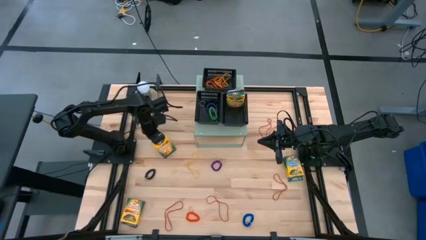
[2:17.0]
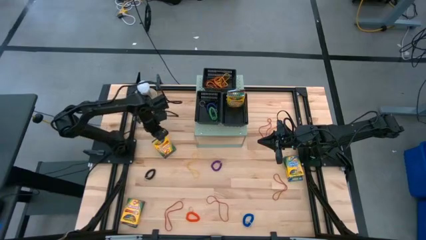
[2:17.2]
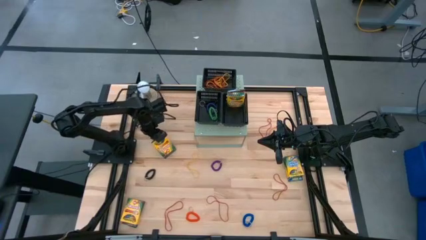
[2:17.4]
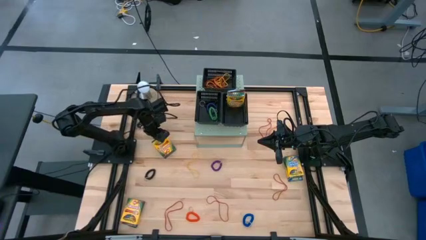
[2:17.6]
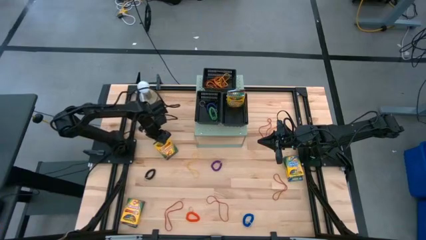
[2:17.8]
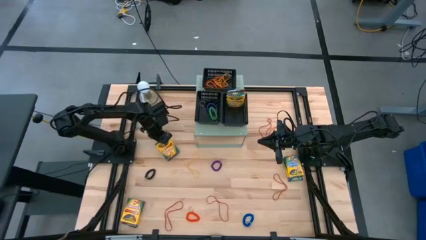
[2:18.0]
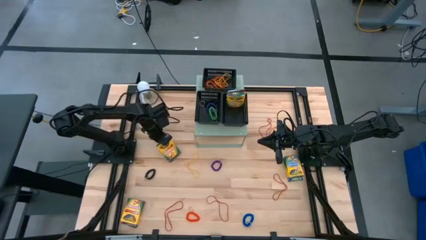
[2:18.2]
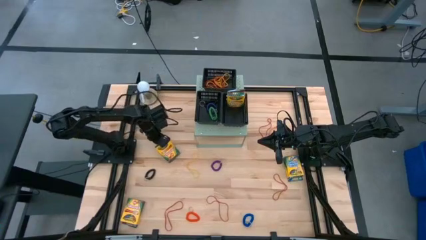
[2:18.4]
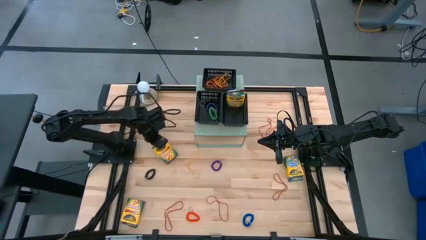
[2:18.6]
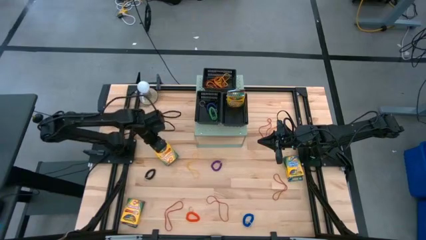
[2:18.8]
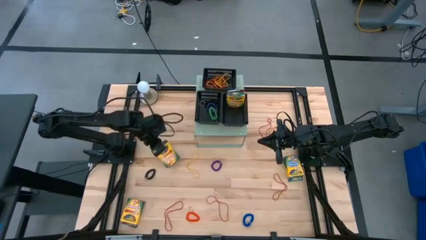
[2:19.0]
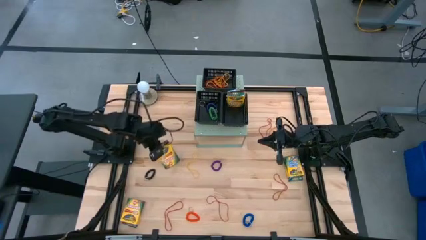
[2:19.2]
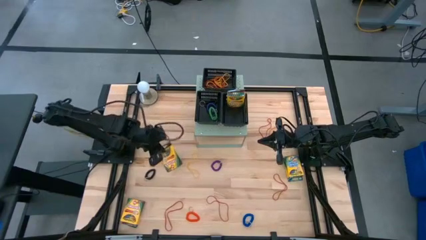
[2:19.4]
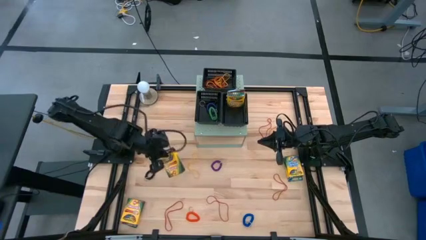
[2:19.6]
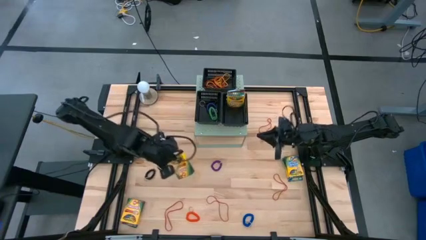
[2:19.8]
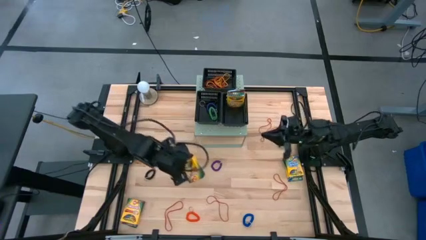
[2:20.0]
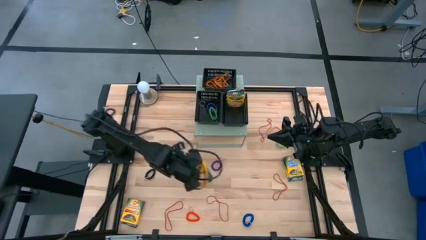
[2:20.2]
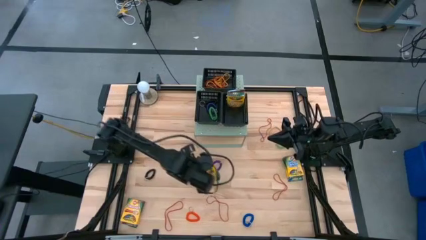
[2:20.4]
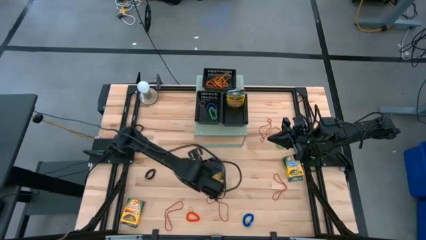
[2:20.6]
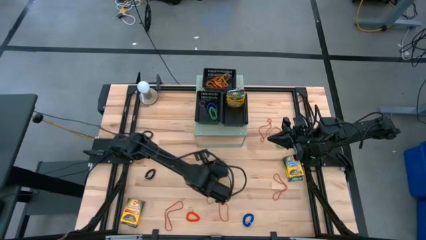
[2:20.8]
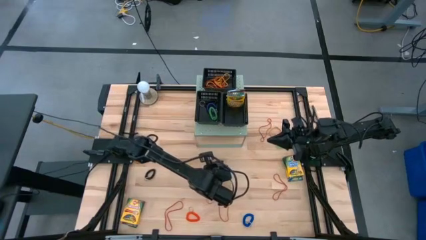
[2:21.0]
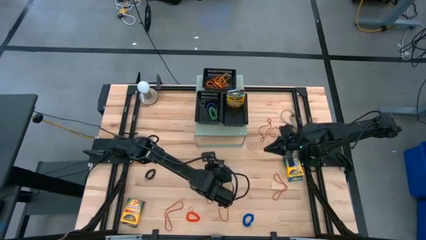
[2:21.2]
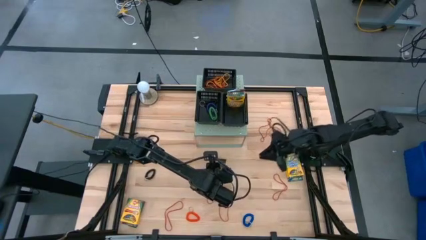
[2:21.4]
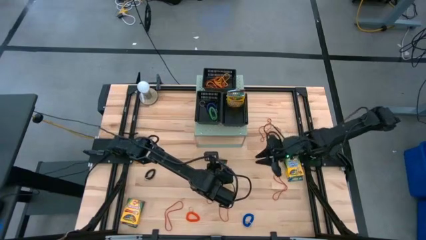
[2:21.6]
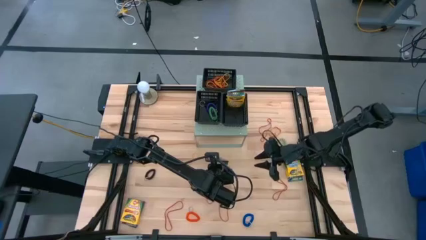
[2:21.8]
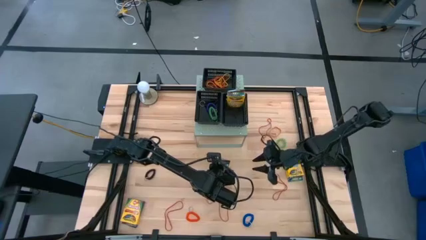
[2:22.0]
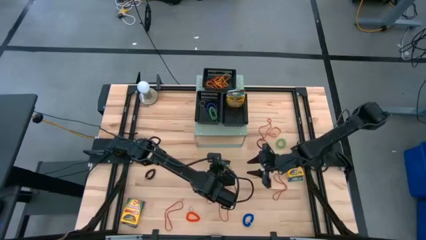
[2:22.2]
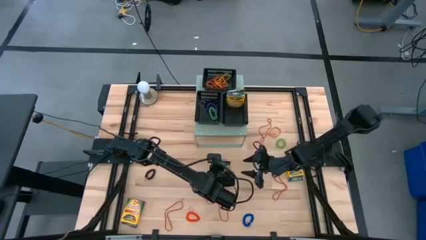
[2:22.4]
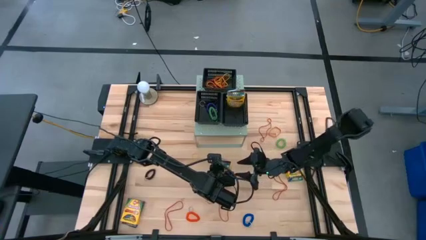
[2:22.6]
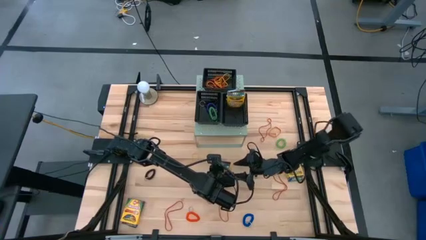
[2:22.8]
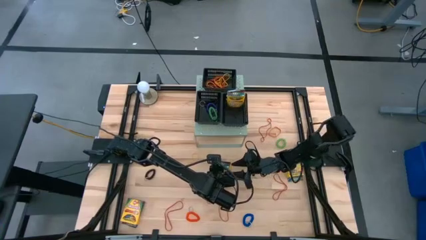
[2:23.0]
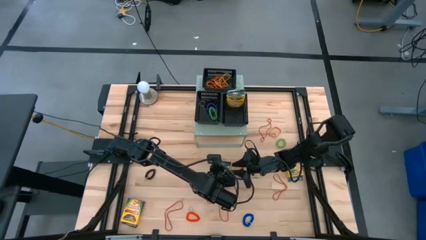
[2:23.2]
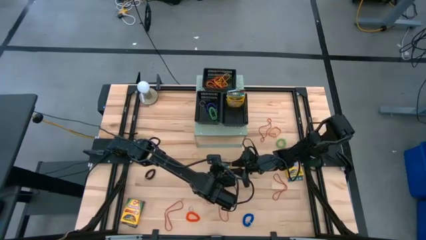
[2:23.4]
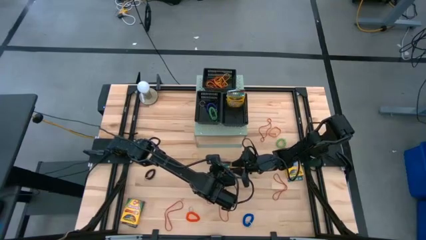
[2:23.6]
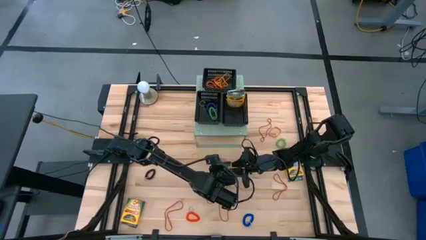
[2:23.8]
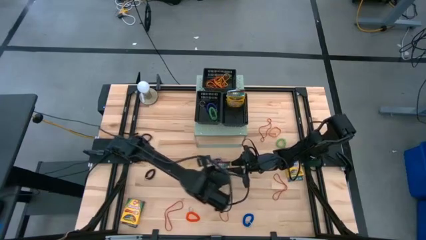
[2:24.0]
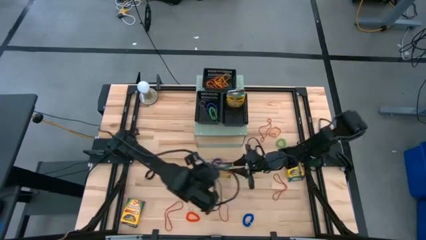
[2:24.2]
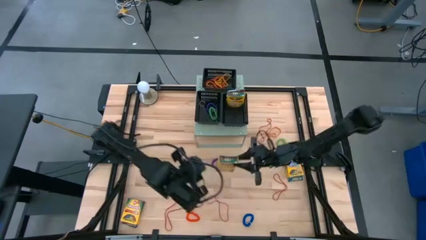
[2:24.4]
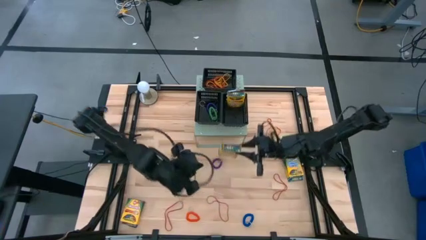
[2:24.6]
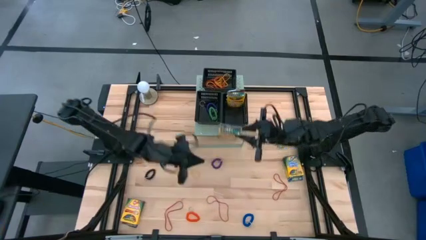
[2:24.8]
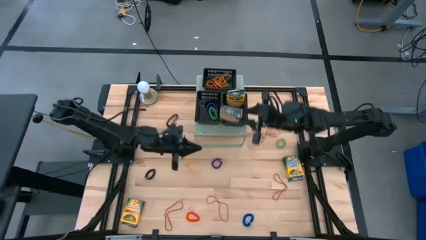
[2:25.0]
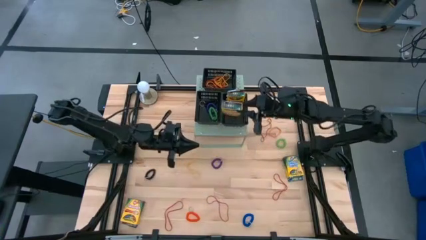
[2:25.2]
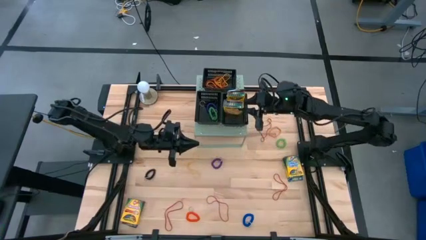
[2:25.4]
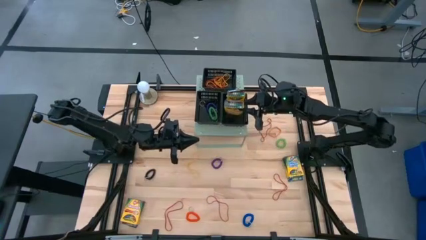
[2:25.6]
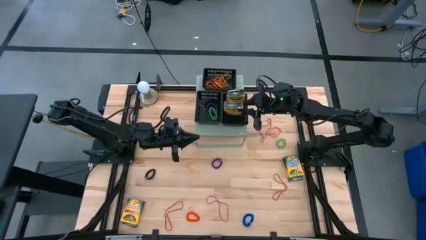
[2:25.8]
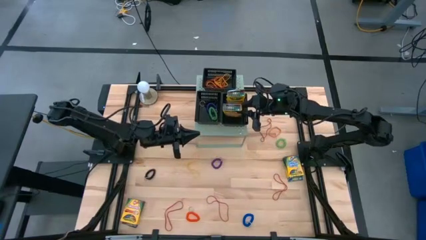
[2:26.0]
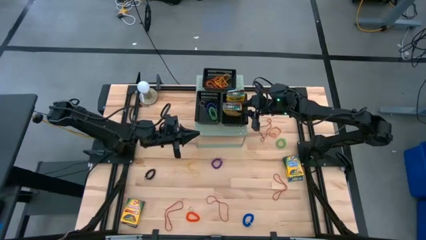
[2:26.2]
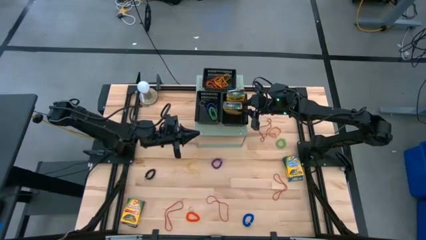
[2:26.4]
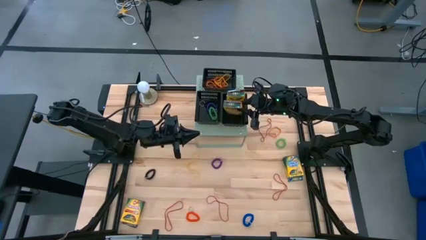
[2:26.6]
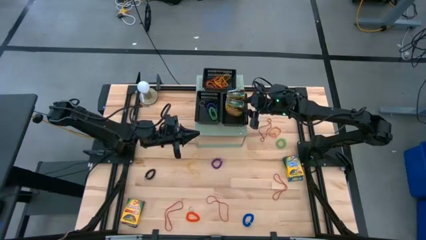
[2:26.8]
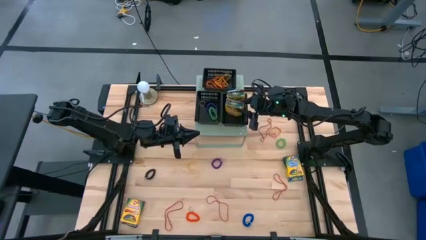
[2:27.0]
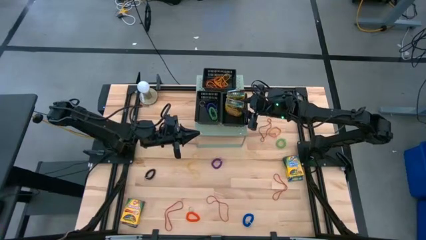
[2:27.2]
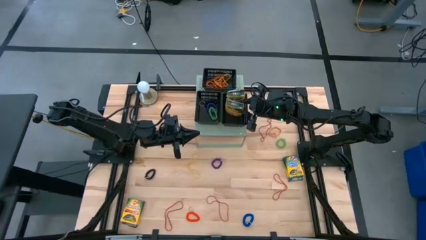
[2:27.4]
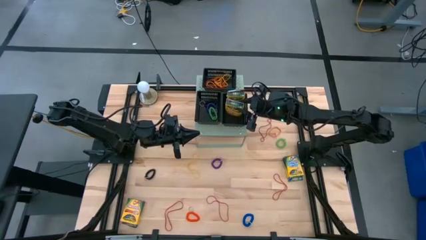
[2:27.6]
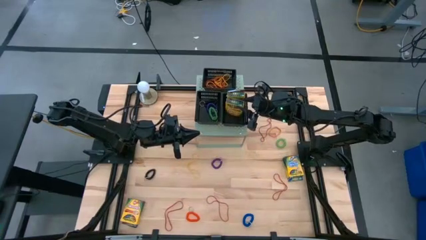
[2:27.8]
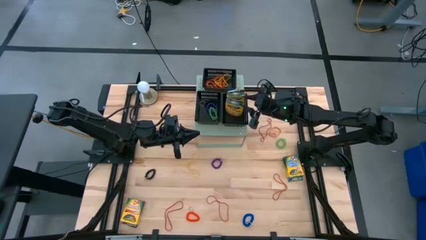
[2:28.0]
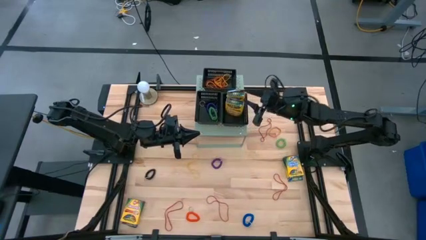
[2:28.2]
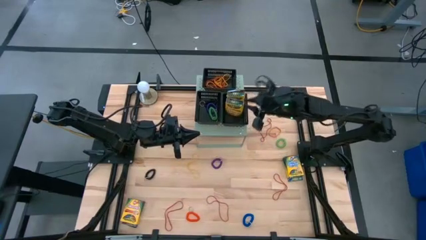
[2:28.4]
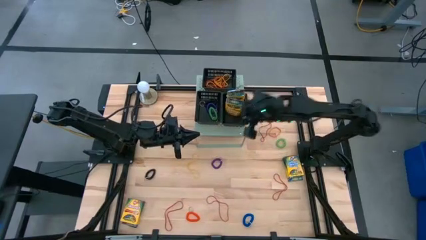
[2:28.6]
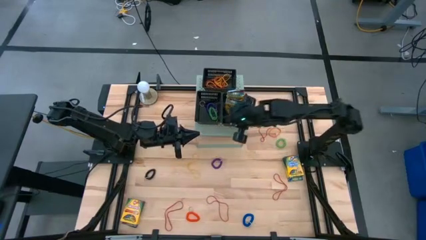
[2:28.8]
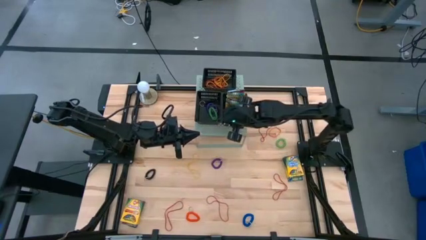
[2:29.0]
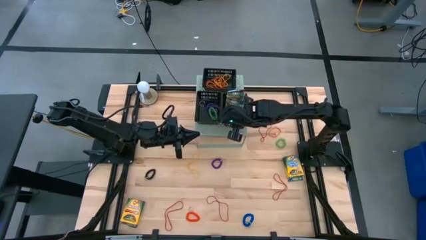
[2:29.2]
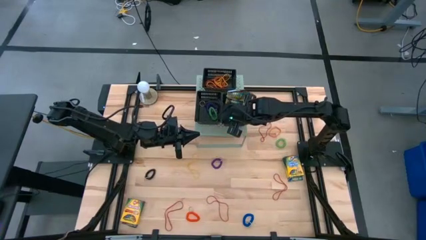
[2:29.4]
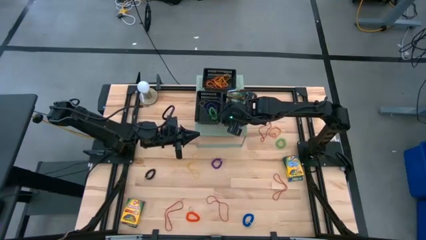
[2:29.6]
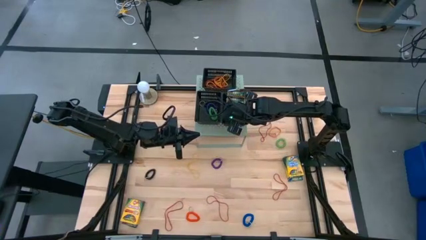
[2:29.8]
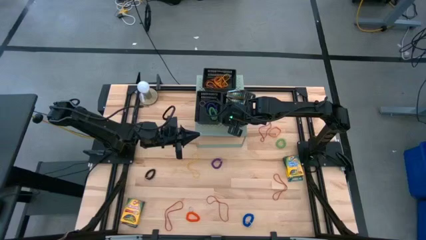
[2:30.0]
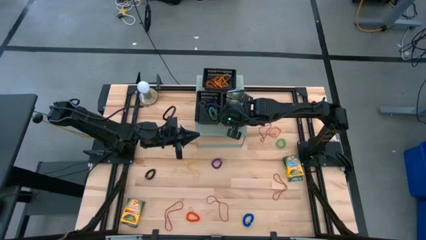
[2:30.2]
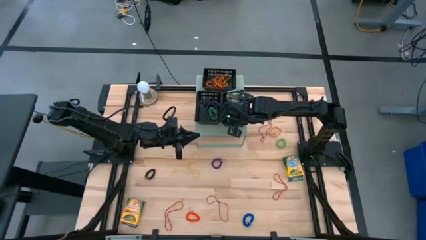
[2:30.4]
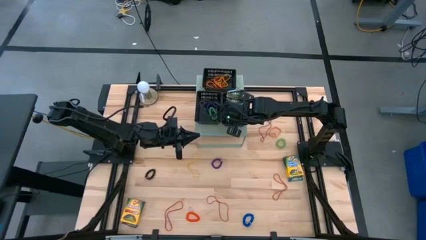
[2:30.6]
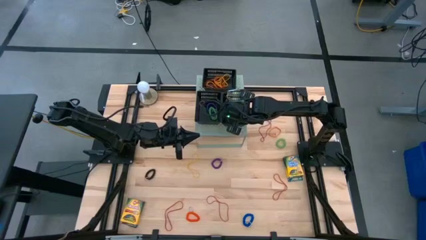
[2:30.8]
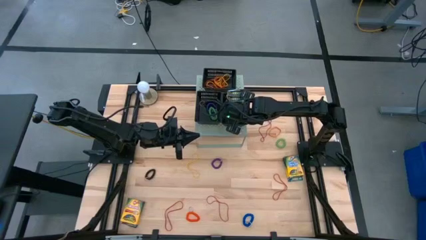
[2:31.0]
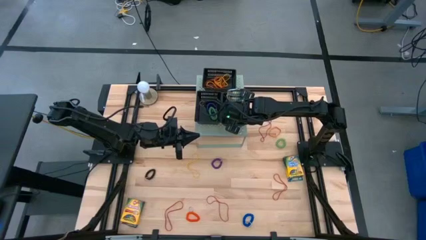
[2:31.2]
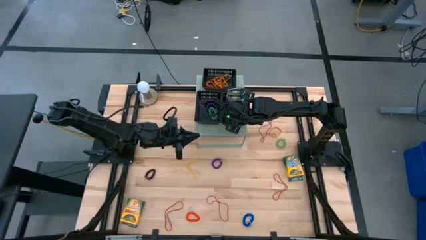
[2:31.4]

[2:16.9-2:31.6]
Task: Pick & Place Office Desk Supplies
Put the yellow crayon box into the bottom right black bin

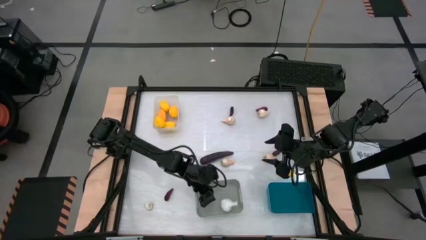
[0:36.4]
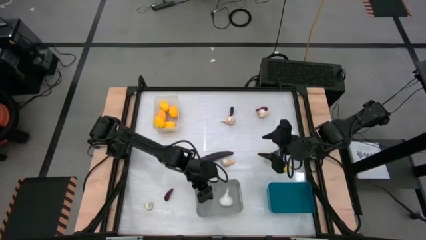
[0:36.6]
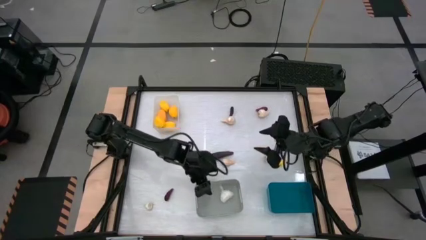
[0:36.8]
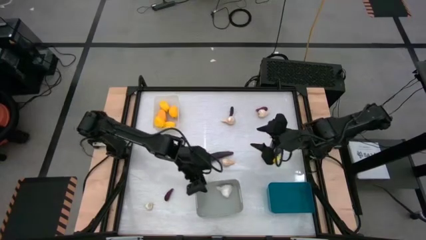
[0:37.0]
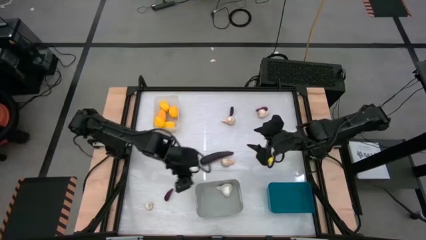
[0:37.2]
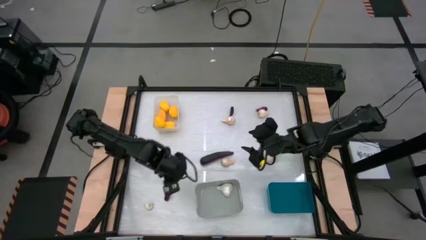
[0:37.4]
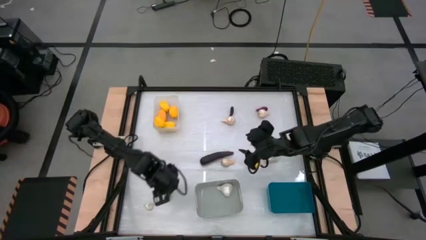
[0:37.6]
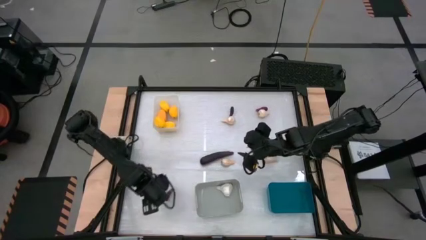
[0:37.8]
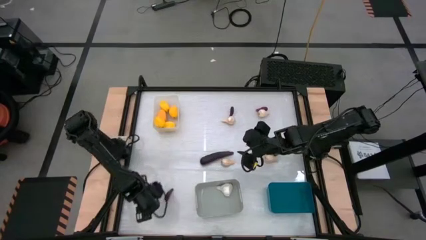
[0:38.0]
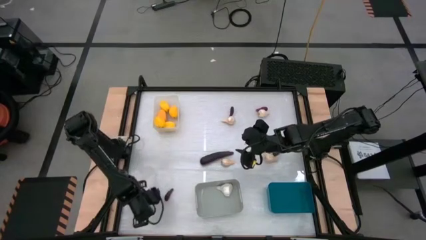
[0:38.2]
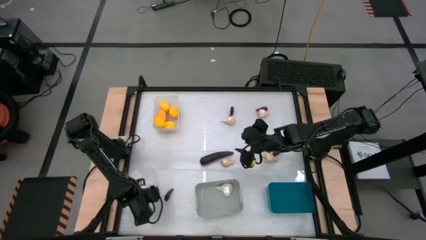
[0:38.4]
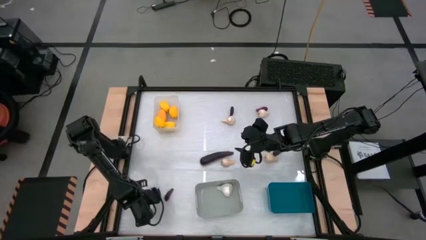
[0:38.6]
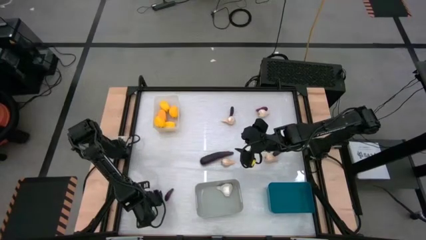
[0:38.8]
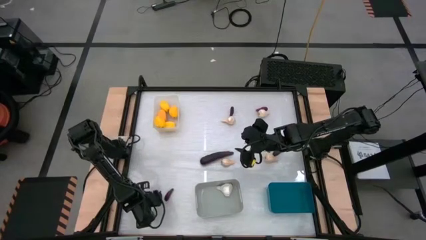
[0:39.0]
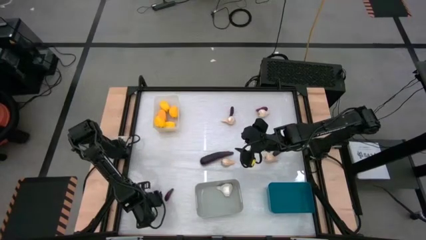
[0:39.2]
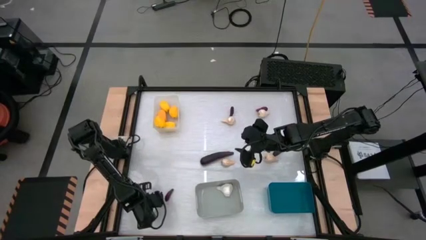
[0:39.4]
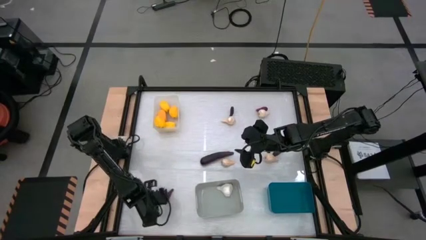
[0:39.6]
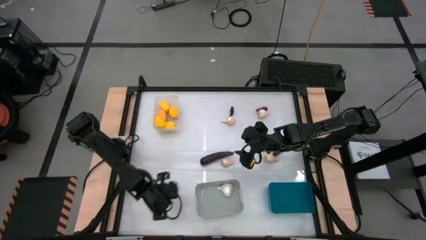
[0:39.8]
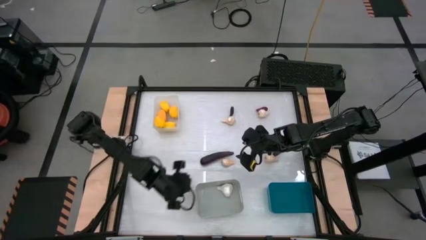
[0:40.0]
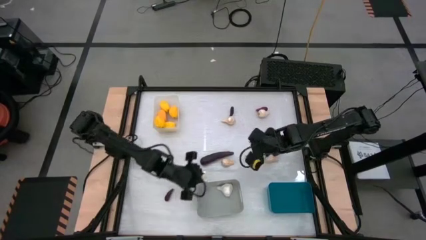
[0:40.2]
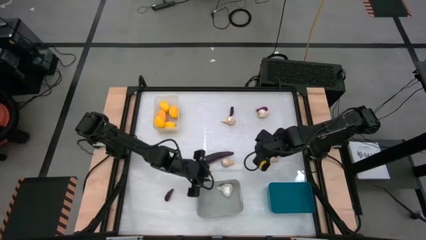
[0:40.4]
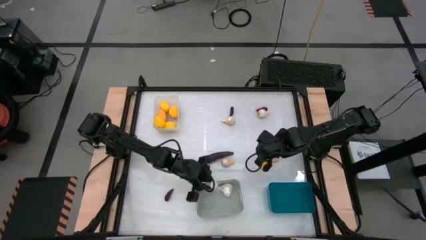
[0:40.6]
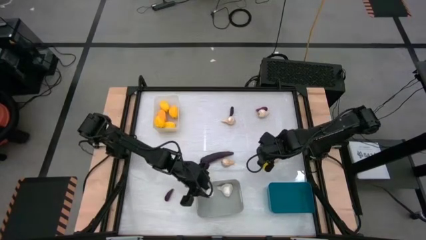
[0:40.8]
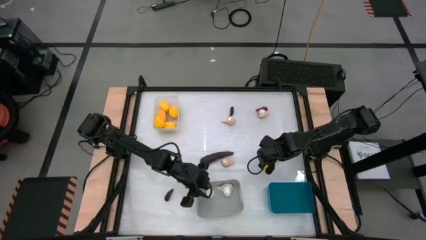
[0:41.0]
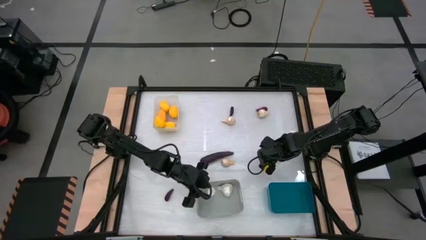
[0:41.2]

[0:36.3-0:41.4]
Task: Sort produce into baskets
Put the garlic into the gray bin
